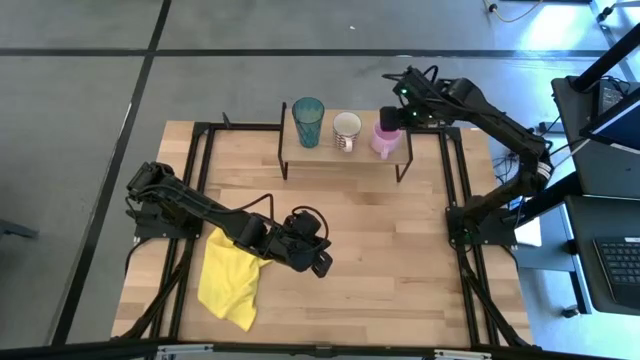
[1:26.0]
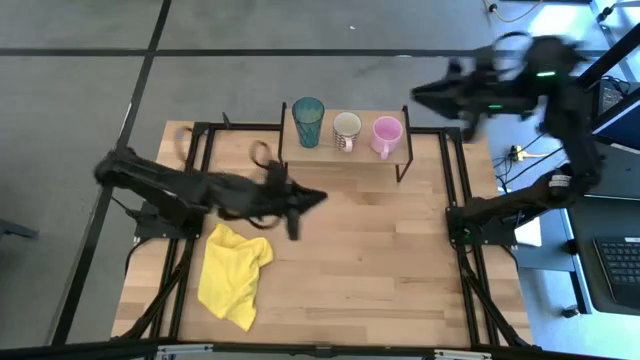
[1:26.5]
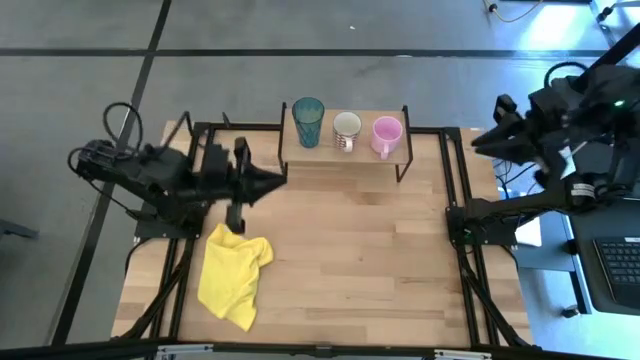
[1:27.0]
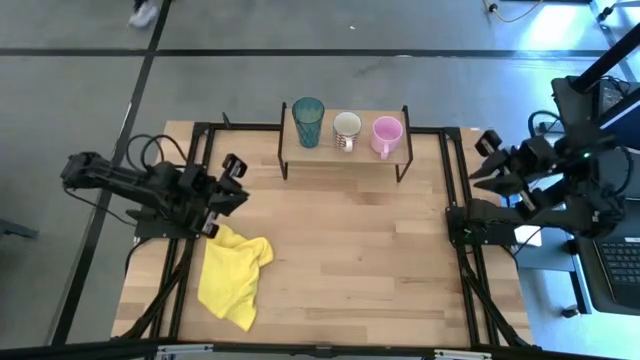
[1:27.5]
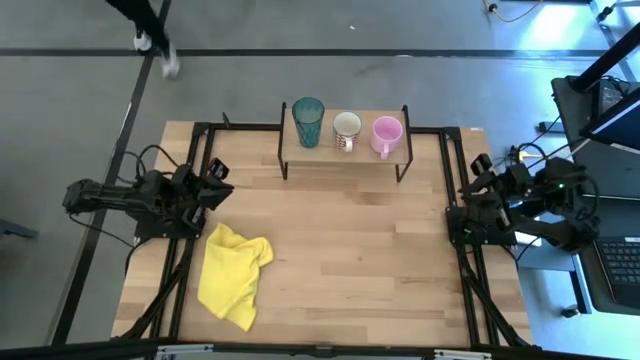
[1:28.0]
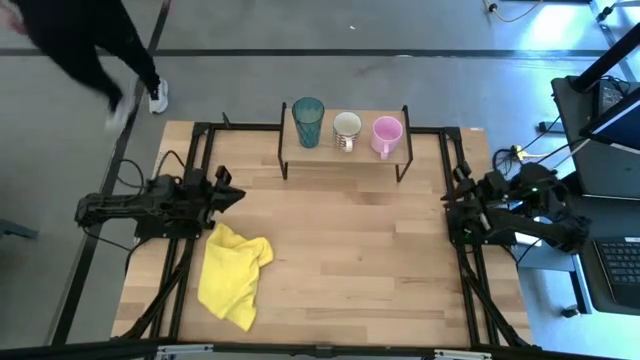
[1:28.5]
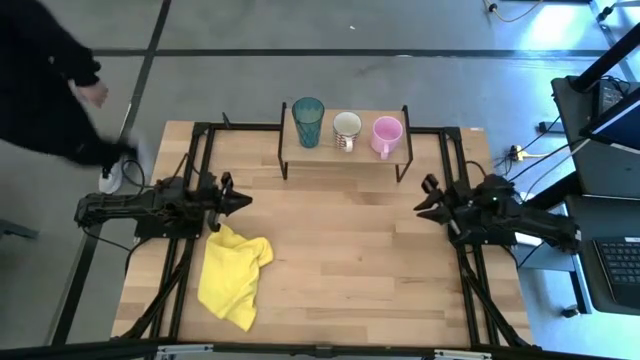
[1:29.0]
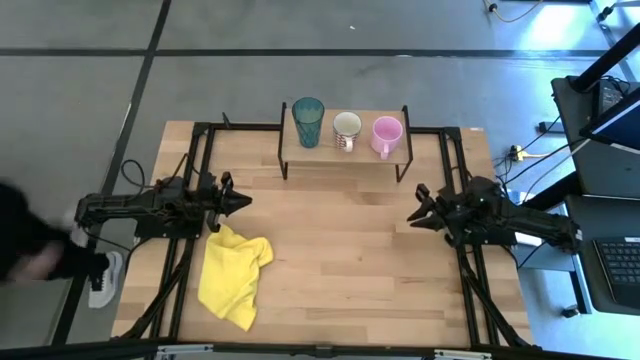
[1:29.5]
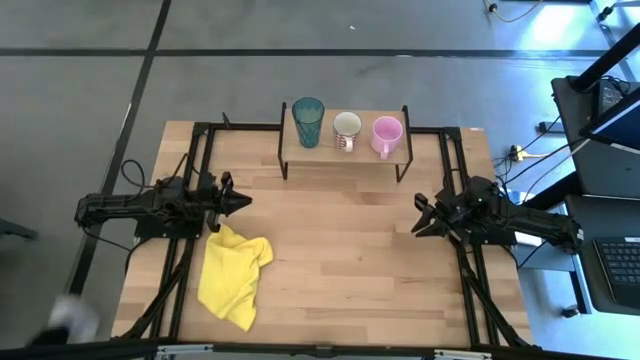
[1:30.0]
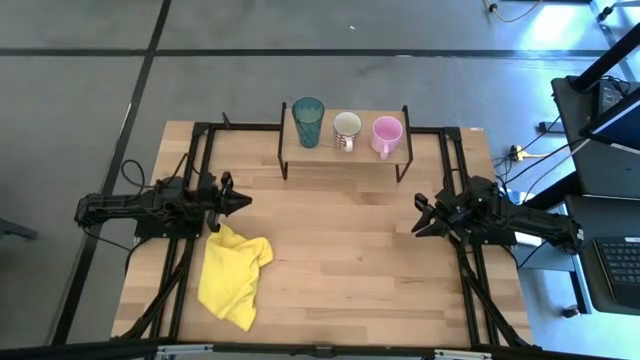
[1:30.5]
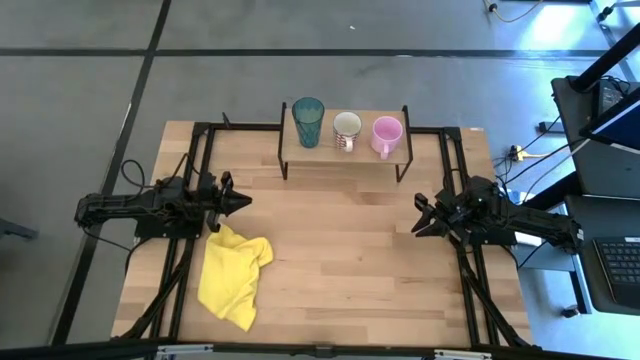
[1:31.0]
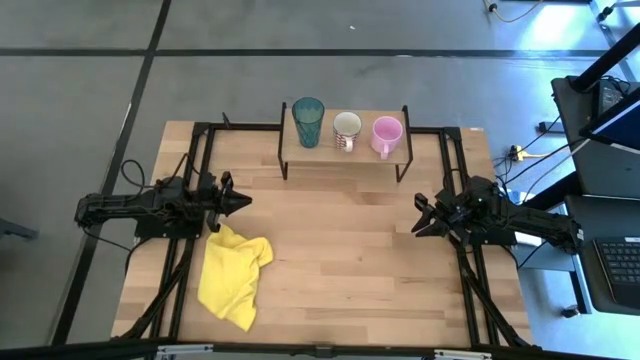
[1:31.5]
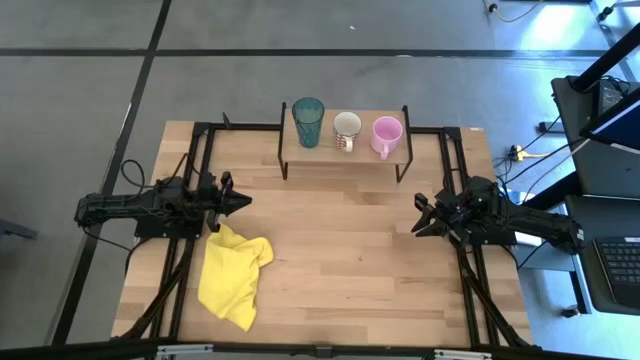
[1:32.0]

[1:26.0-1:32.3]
Task: Stack small to large cups/mugs on shelf
Return to Home Position

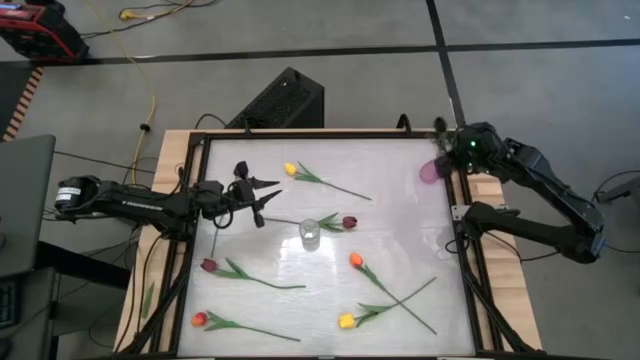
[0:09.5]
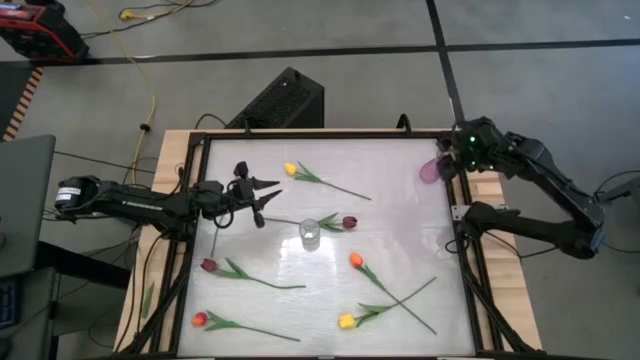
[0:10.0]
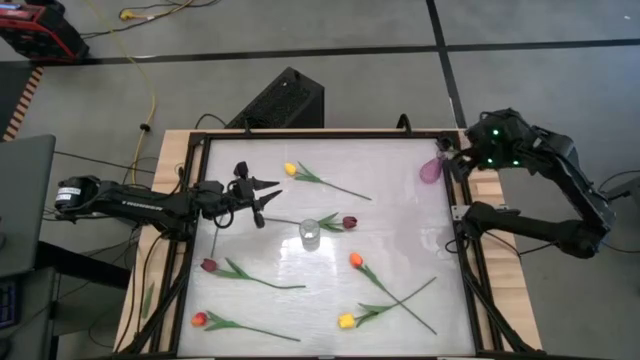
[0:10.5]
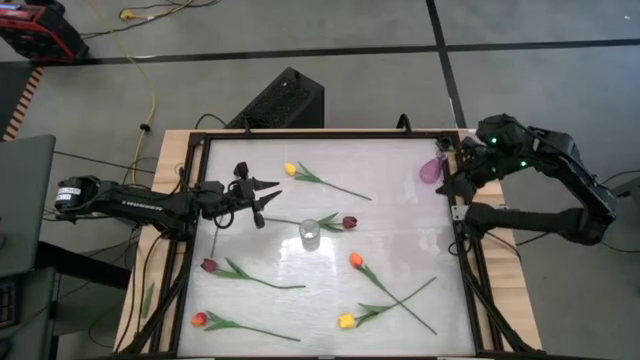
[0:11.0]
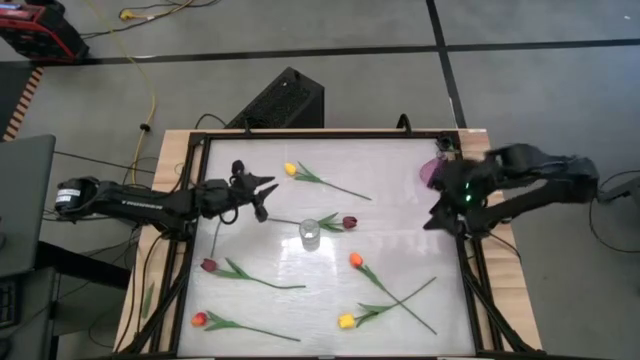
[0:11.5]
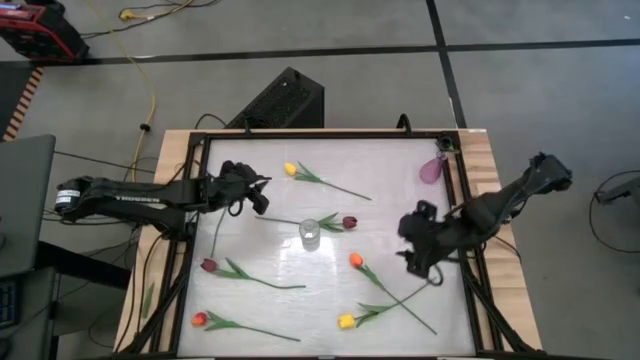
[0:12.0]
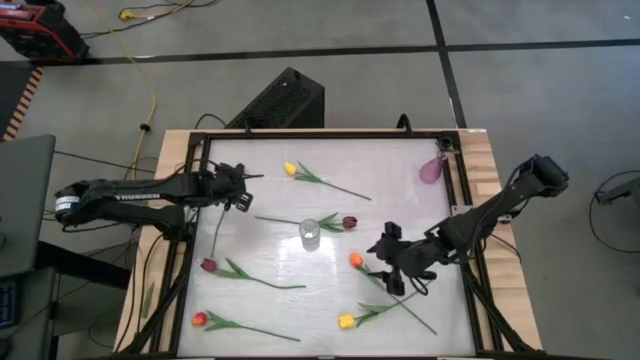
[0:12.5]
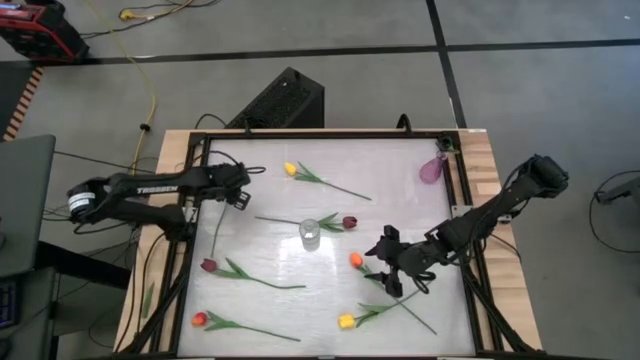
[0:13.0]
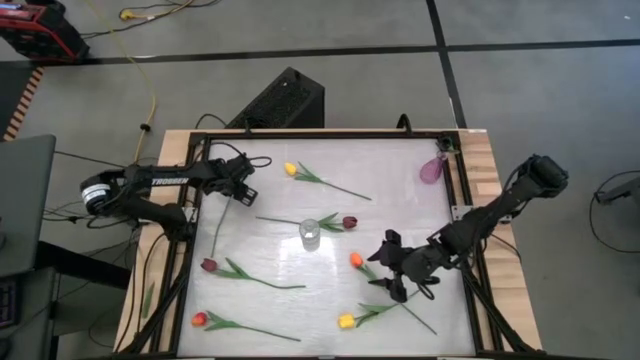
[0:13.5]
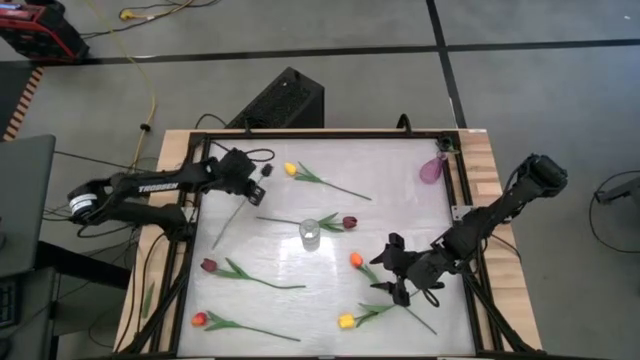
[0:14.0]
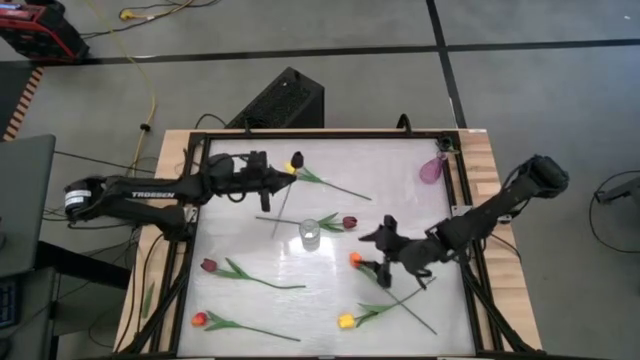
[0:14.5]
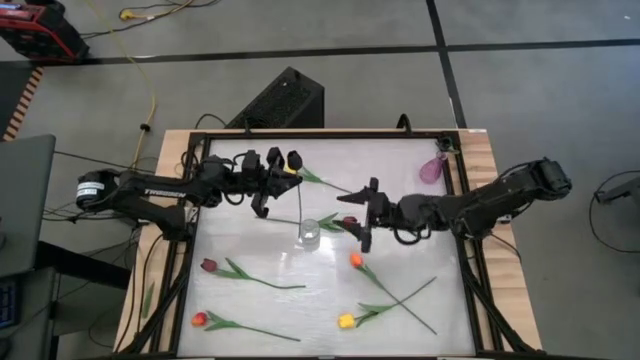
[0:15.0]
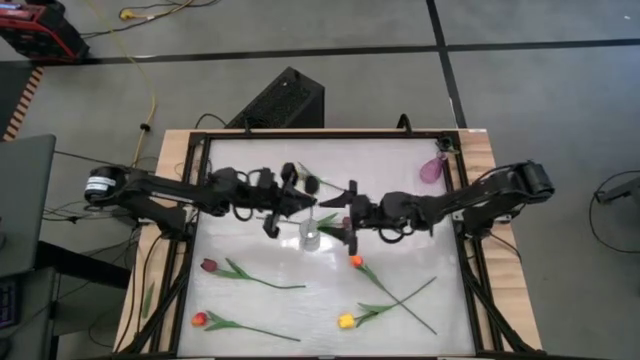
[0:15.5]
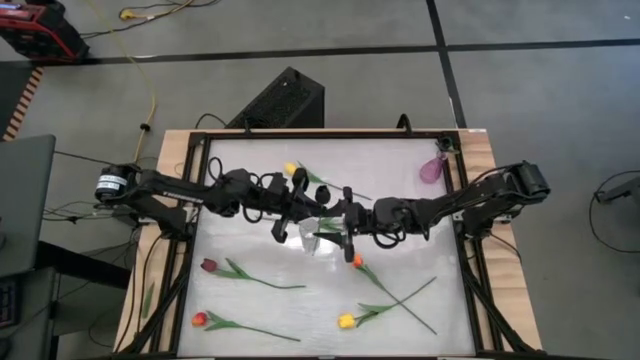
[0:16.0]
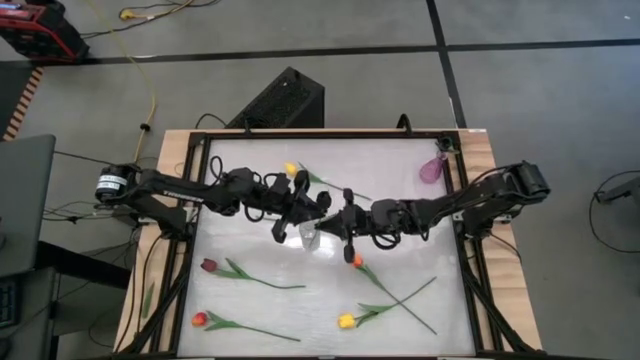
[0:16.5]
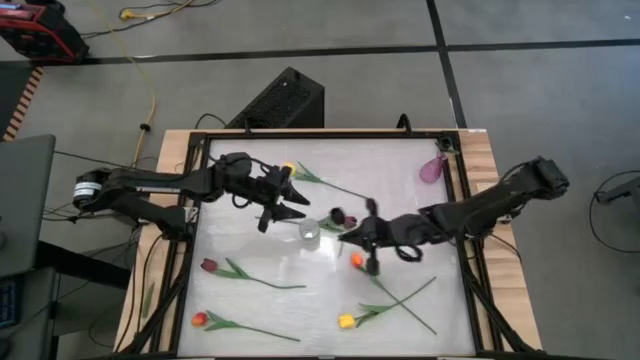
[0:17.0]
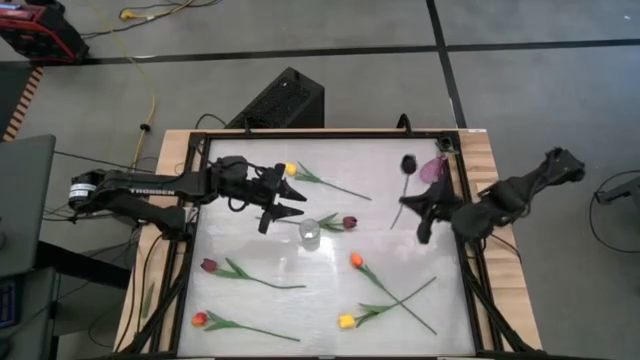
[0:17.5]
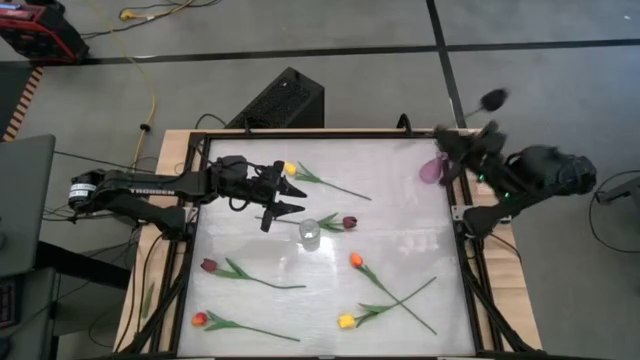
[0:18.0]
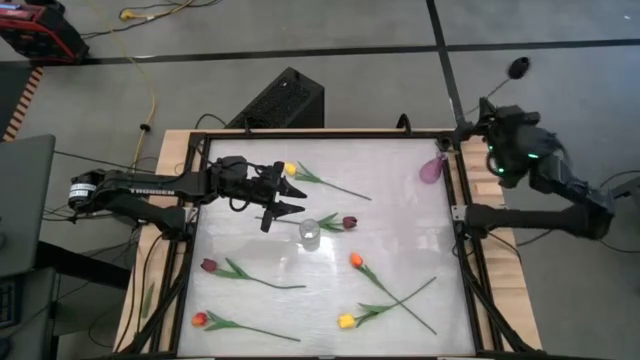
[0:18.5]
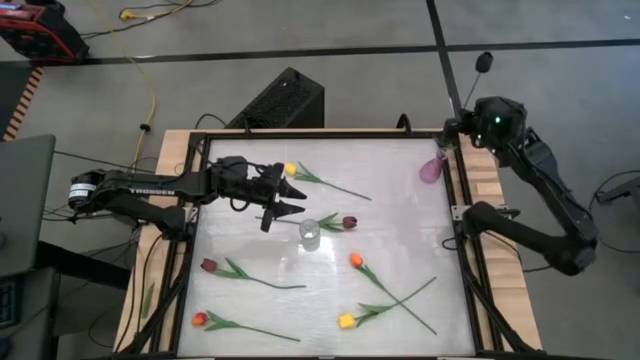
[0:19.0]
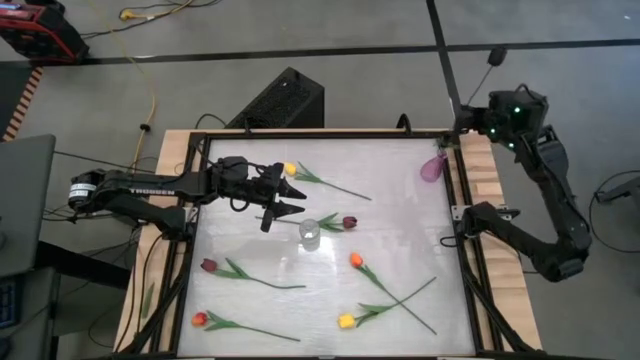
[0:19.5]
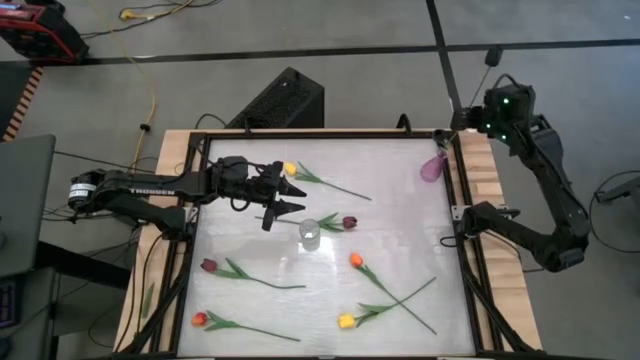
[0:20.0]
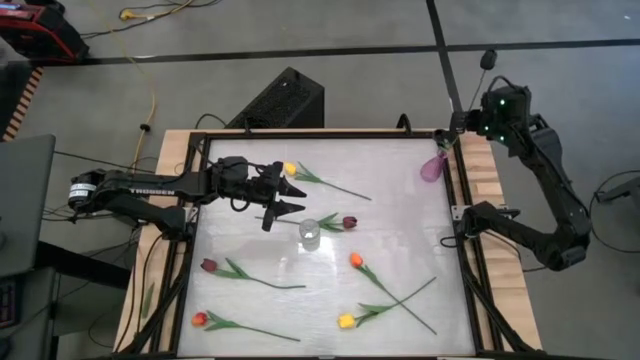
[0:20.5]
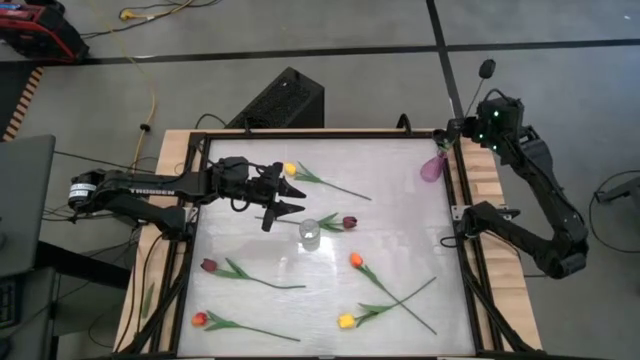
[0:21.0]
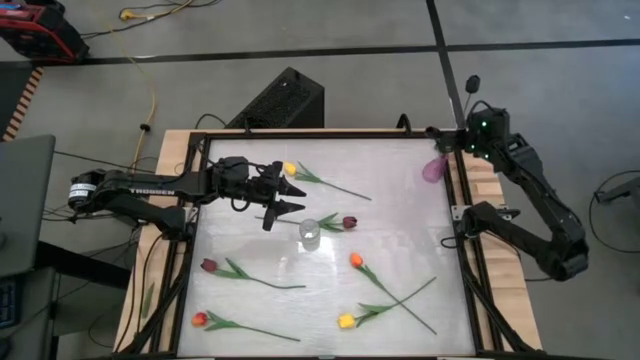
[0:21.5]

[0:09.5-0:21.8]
Task: Sort flowers into vase by color
Put the black flower into the violet vase
